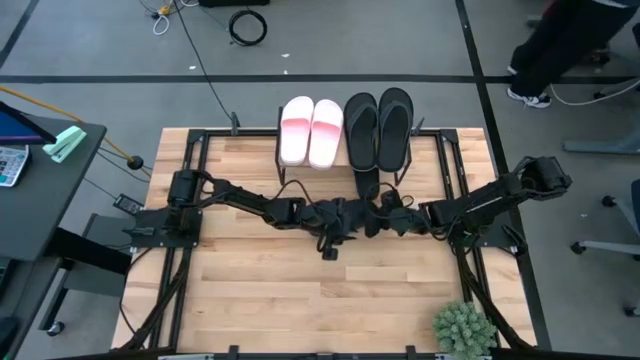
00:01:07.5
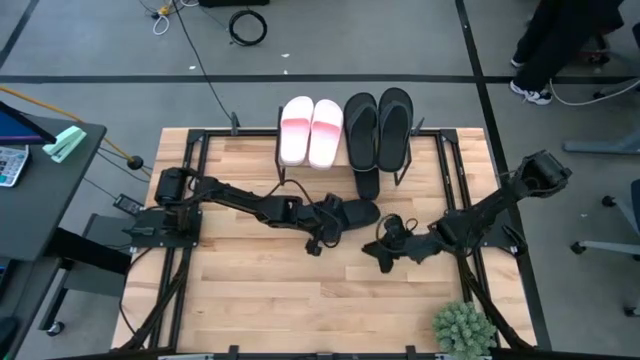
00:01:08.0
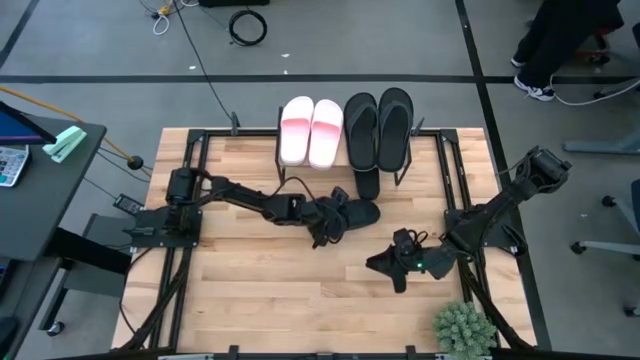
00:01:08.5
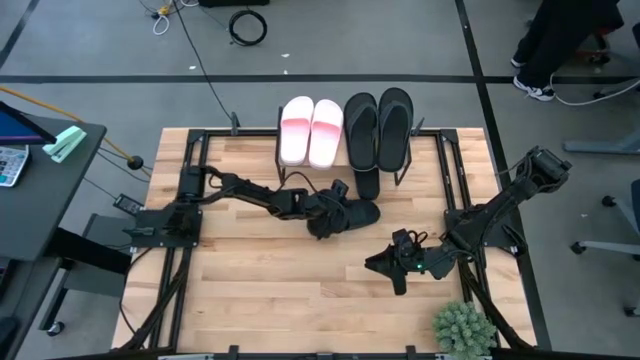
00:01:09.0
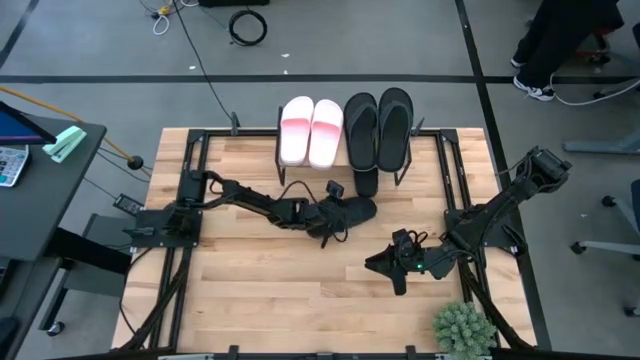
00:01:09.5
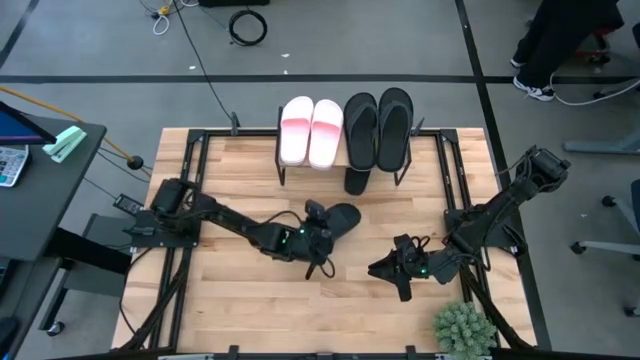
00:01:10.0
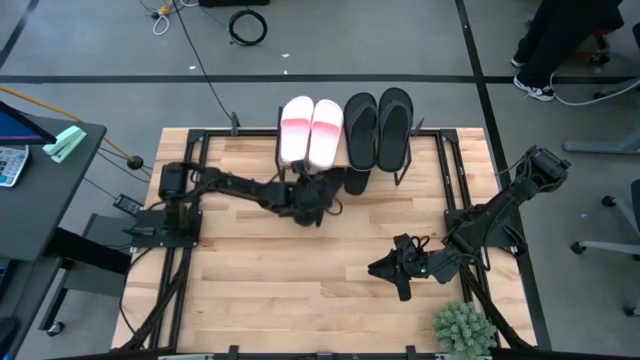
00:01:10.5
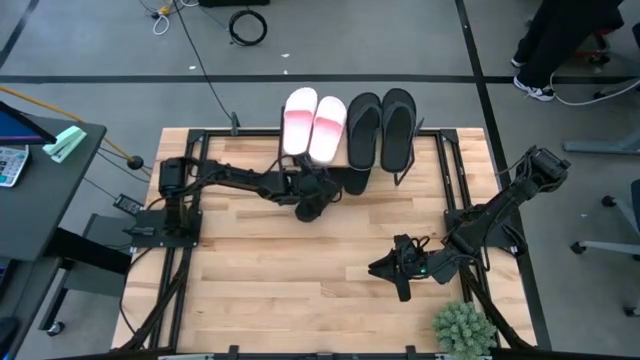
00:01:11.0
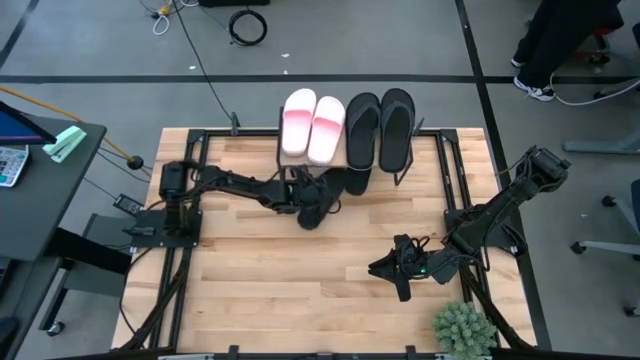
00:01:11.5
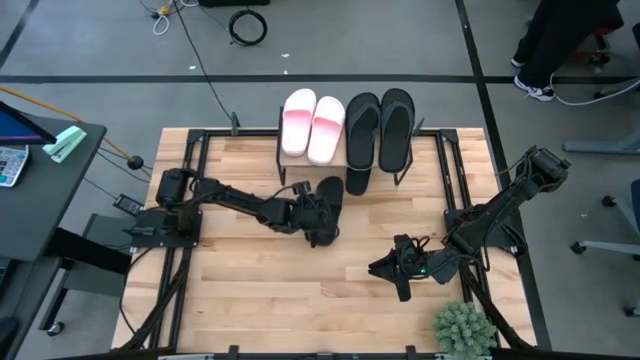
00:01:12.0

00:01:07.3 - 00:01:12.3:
Task: Pick and place slides into the shelf
Move the black slide to the center of the table

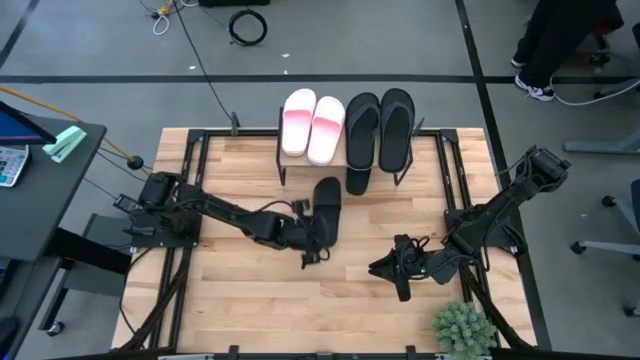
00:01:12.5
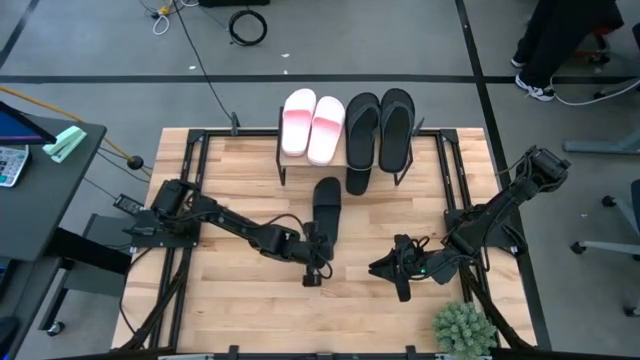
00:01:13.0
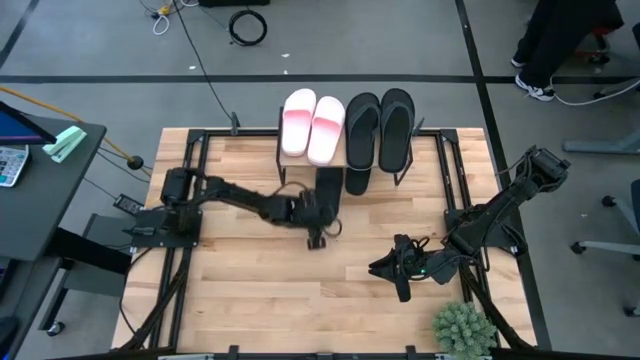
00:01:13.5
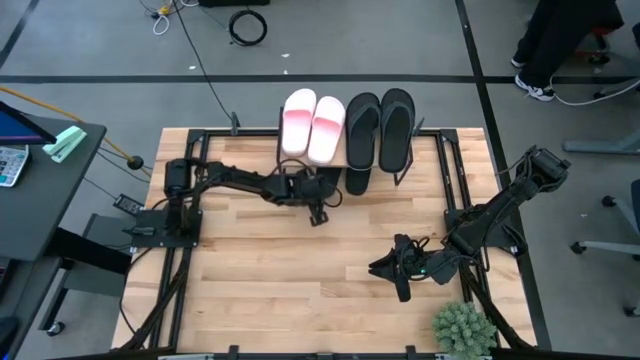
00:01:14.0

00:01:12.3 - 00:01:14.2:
Put the black slide under the shelf

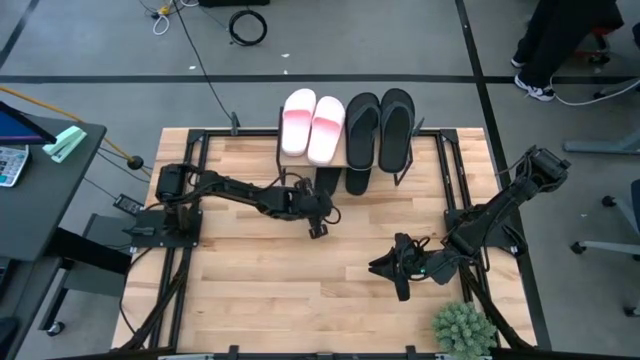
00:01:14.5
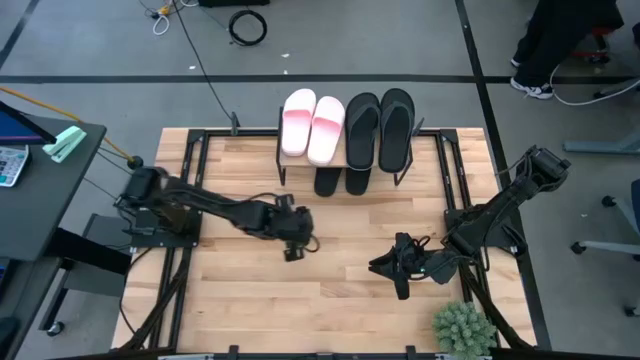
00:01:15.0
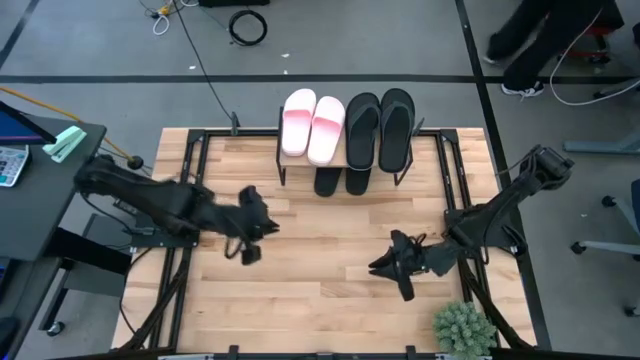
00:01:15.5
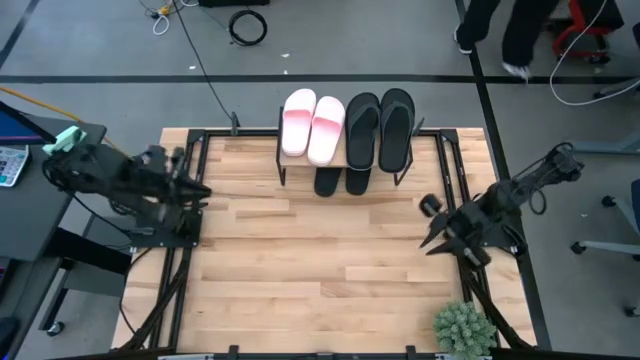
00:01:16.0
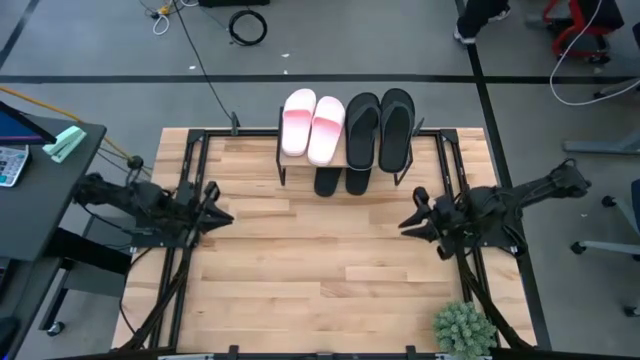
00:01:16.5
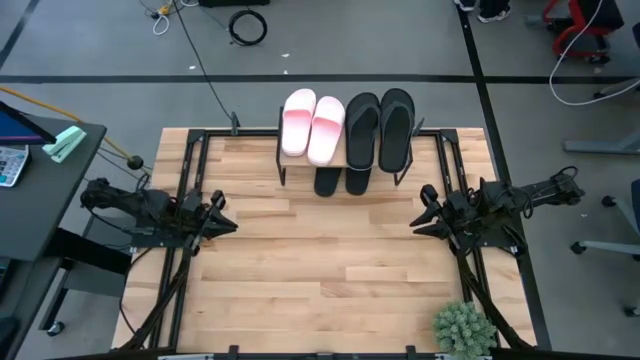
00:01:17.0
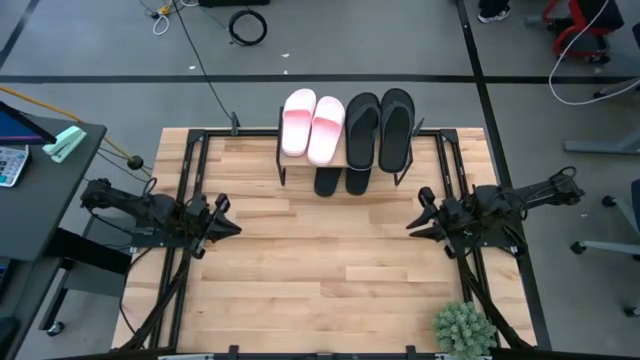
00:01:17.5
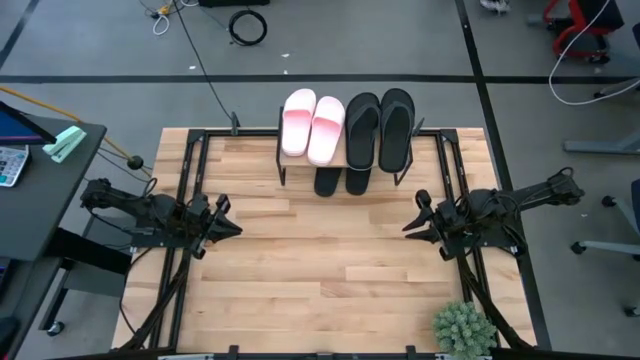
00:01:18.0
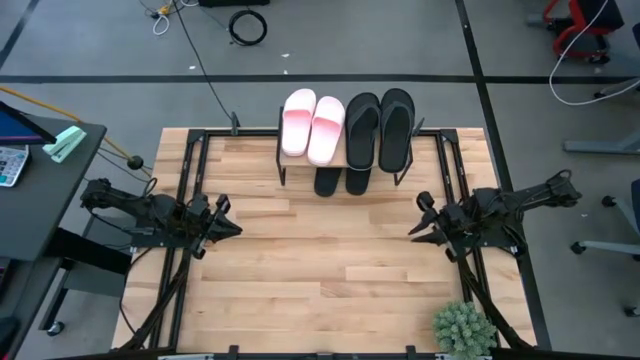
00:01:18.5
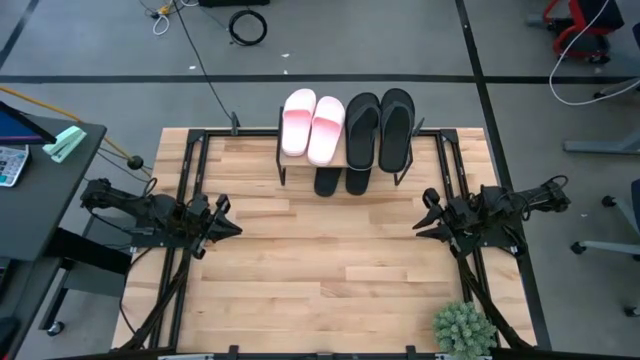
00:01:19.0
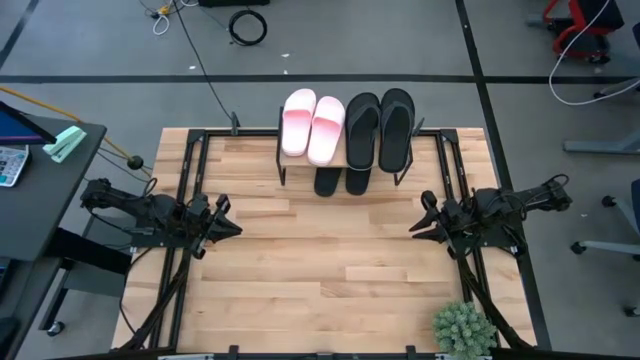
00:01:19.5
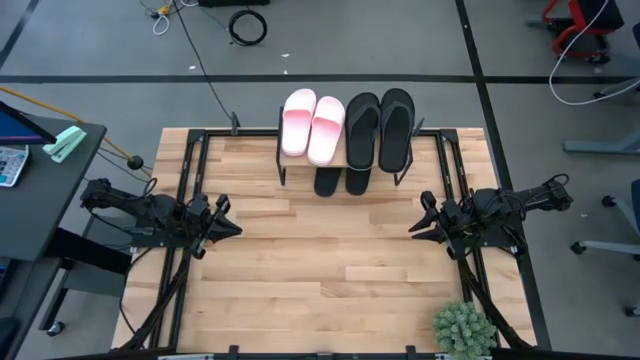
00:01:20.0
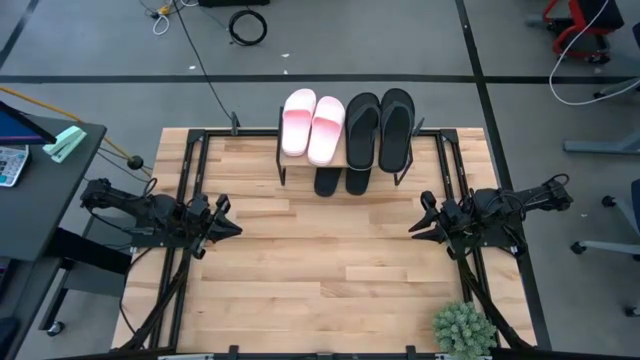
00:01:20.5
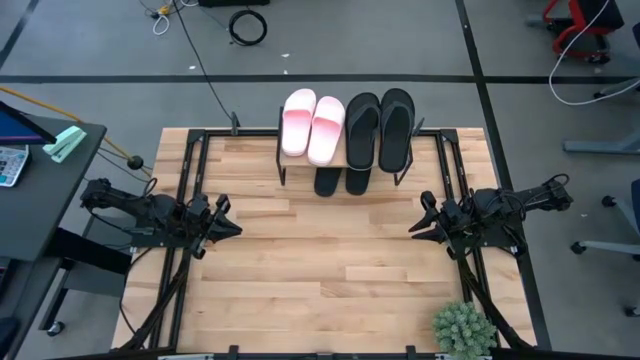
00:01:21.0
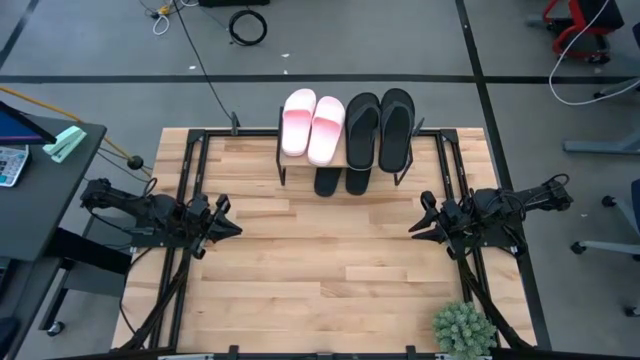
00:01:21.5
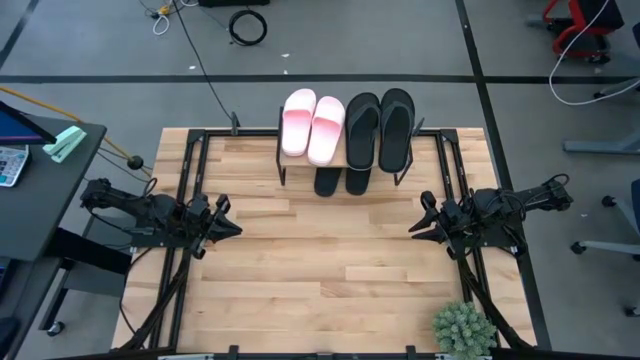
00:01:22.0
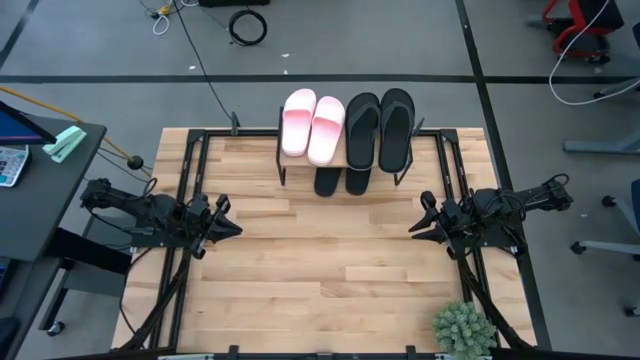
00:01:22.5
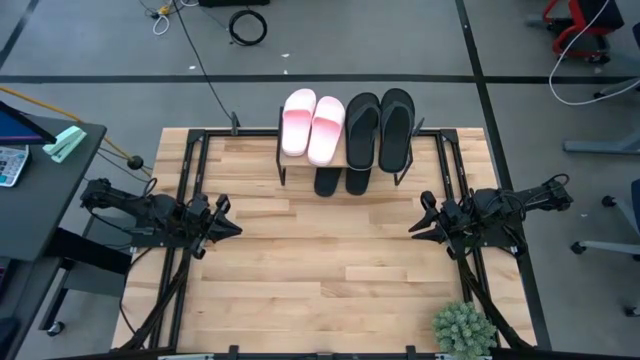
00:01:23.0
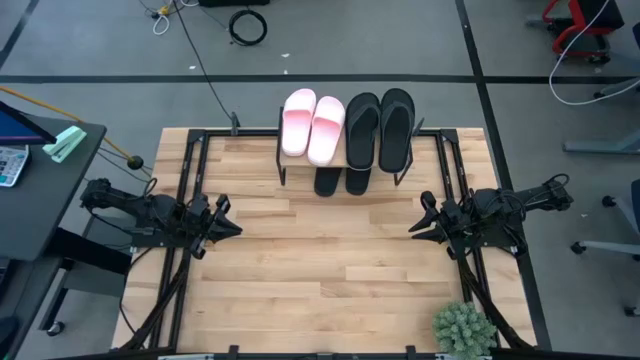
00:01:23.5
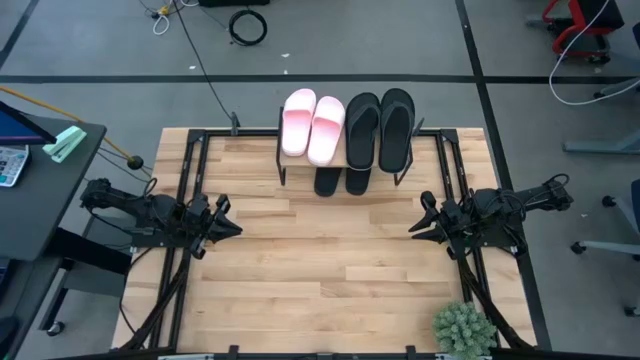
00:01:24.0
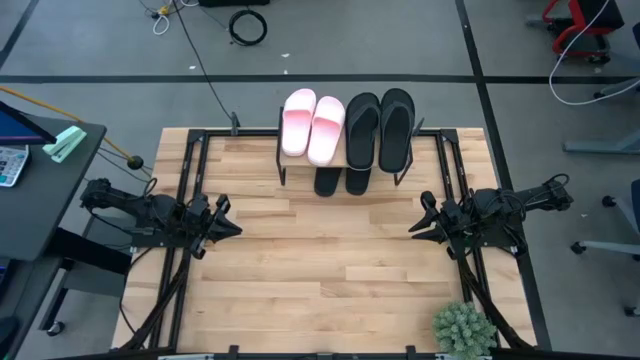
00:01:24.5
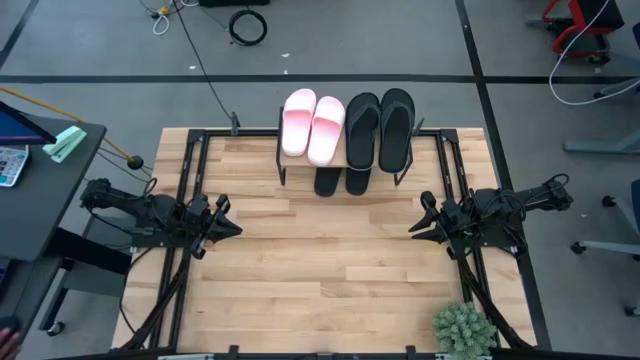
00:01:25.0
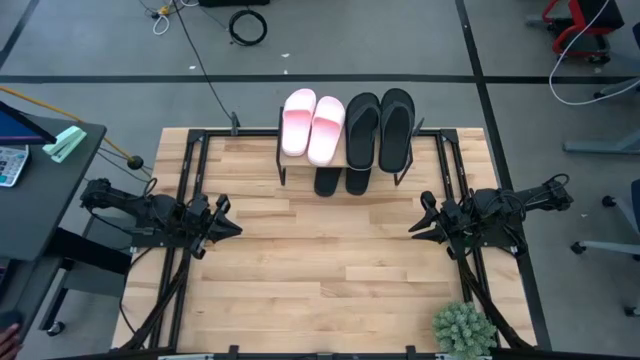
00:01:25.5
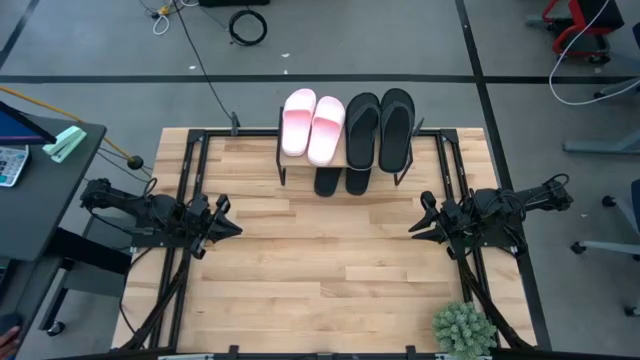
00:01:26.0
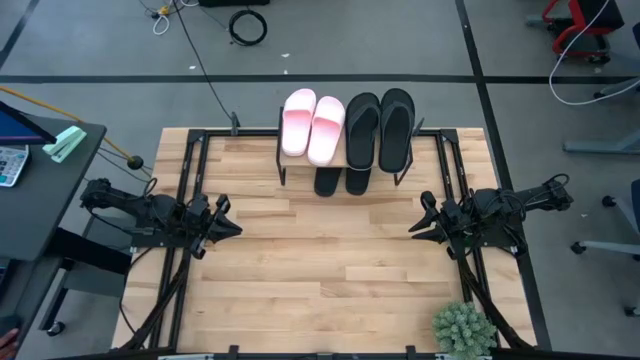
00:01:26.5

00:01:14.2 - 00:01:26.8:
Return to Home Position

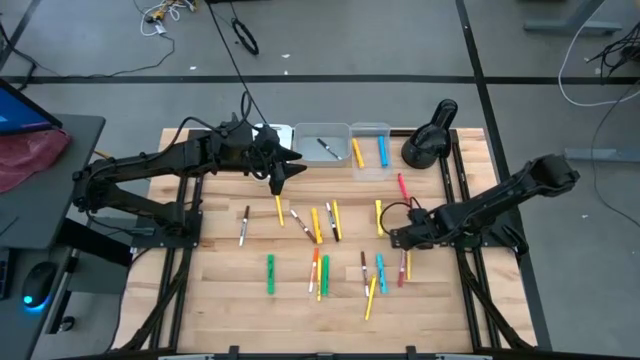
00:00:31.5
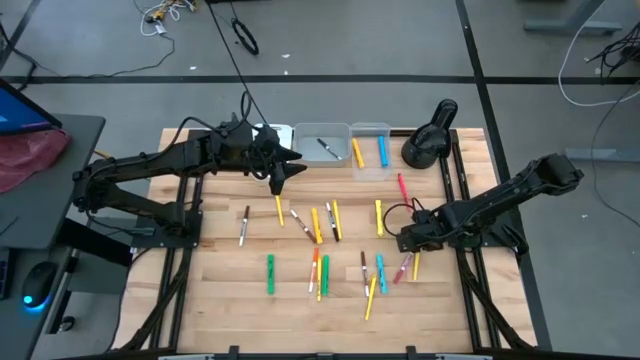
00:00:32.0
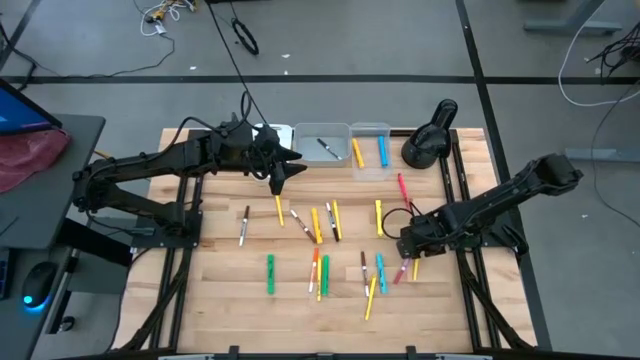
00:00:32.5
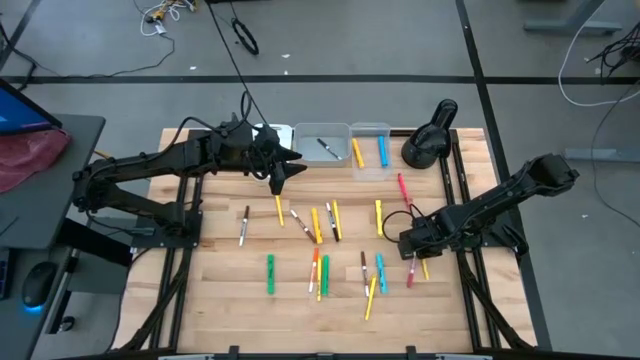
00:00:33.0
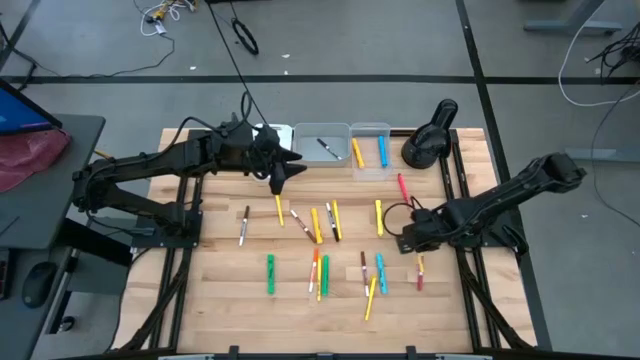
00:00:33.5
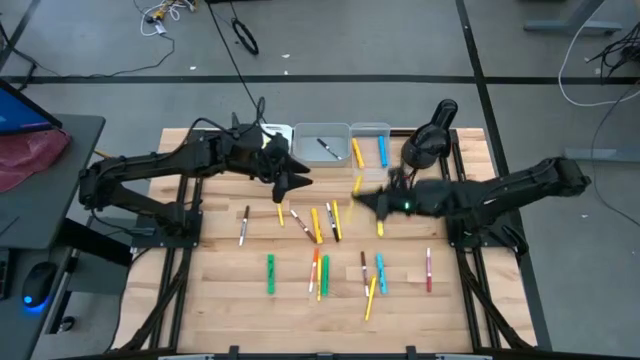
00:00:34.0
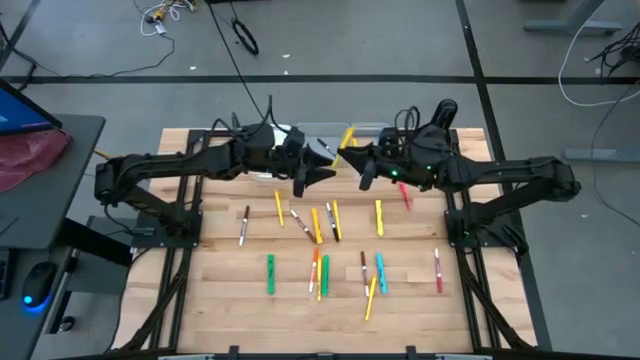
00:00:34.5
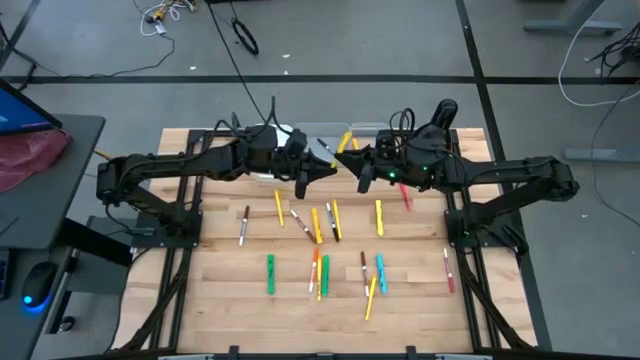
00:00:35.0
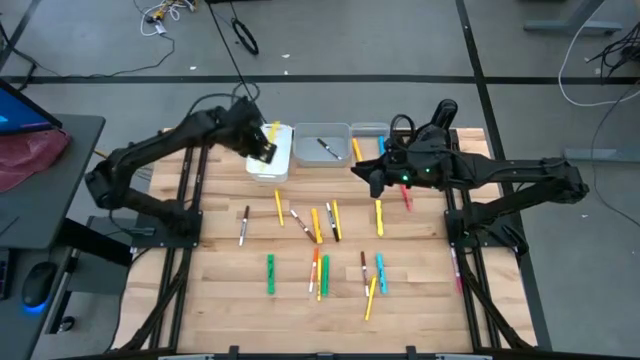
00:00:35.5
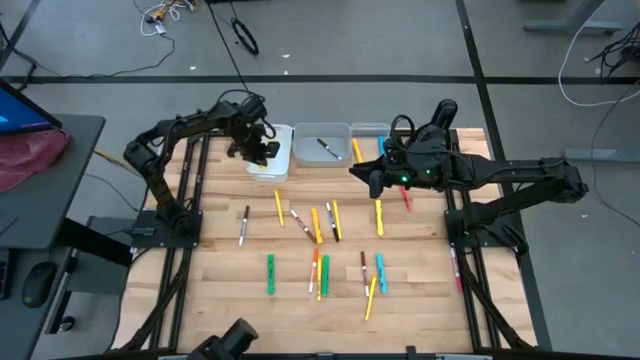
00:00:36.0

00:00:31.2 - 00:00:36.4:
Task: Pick & Place Markers
Put the yellow pen into the white bin
